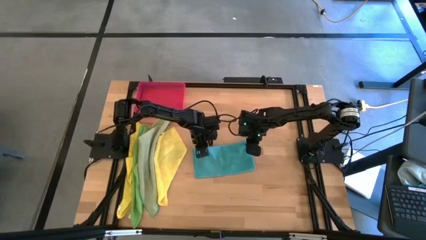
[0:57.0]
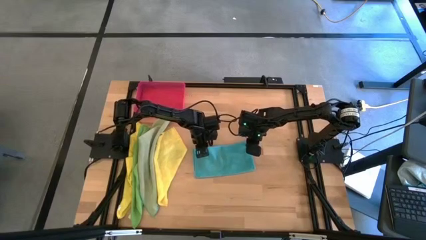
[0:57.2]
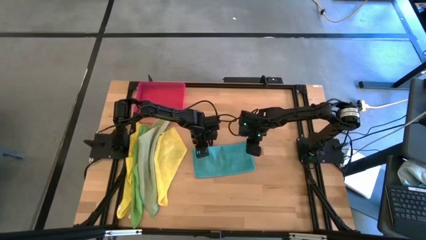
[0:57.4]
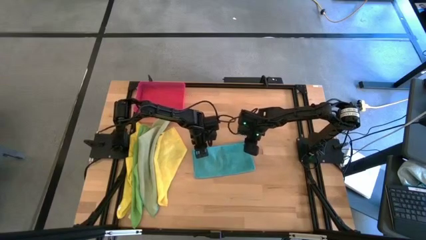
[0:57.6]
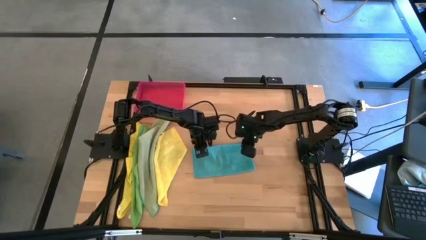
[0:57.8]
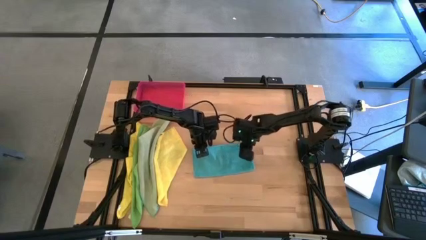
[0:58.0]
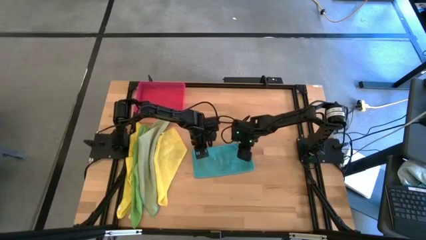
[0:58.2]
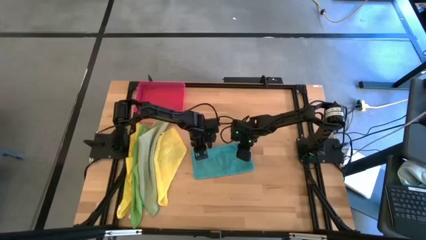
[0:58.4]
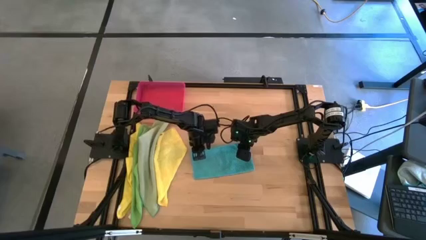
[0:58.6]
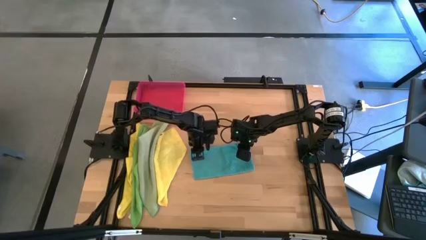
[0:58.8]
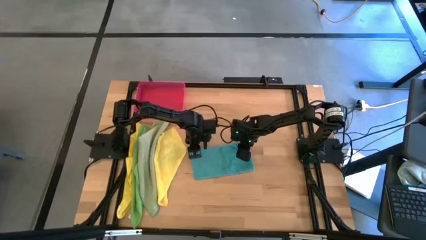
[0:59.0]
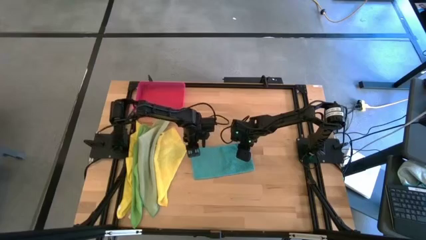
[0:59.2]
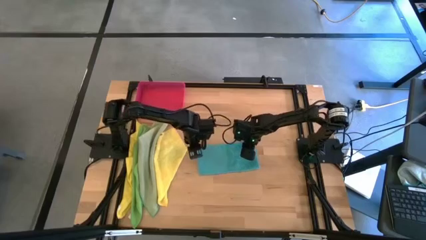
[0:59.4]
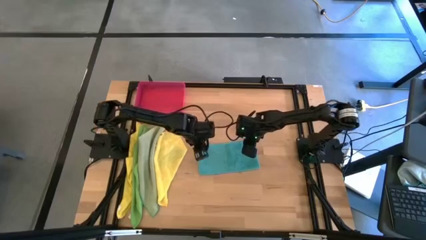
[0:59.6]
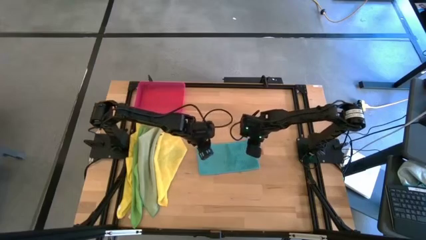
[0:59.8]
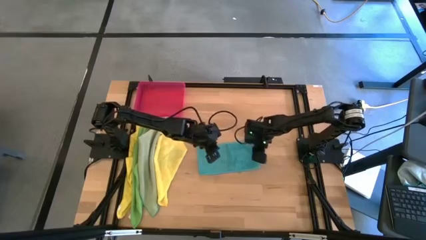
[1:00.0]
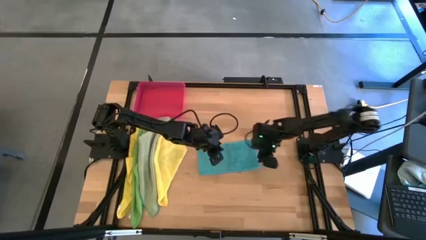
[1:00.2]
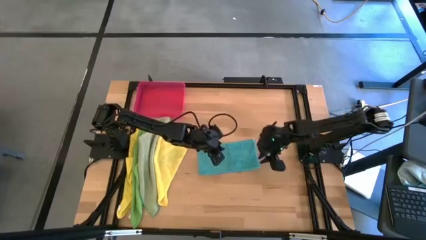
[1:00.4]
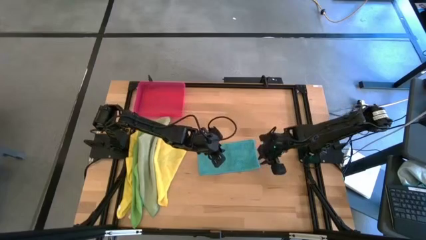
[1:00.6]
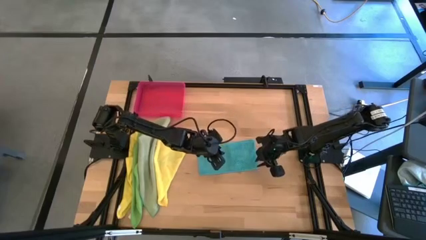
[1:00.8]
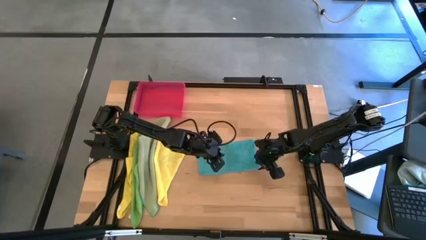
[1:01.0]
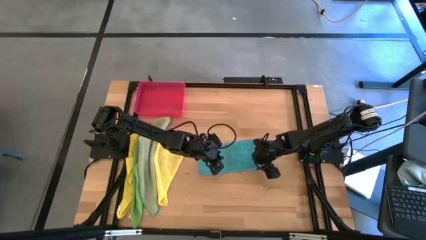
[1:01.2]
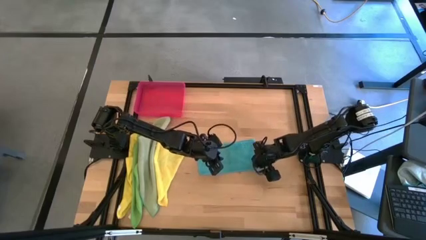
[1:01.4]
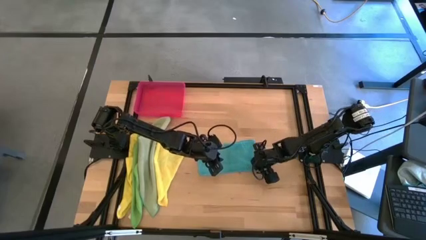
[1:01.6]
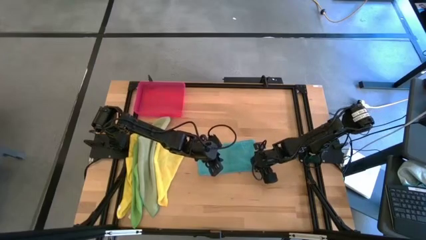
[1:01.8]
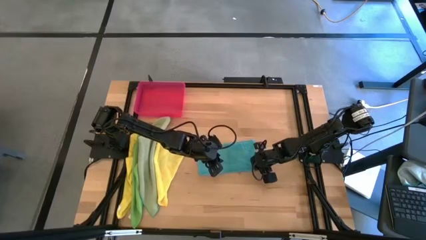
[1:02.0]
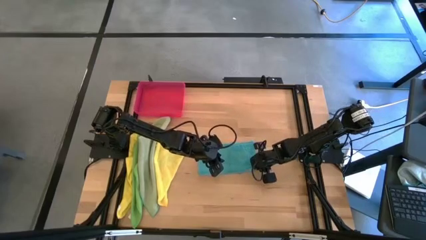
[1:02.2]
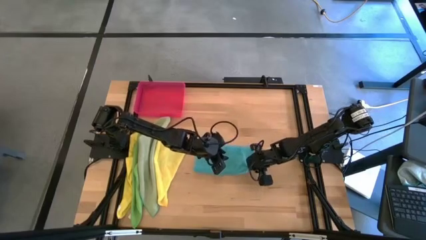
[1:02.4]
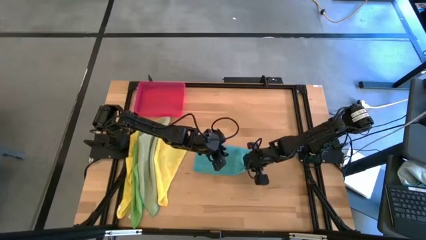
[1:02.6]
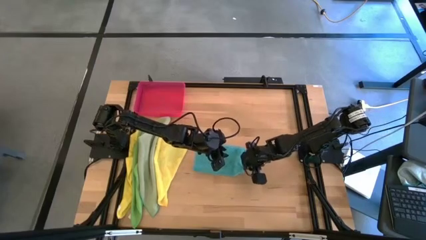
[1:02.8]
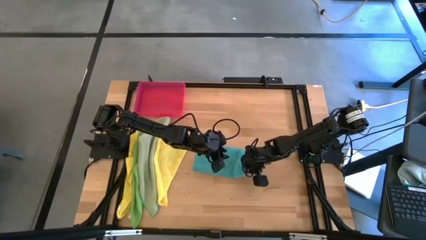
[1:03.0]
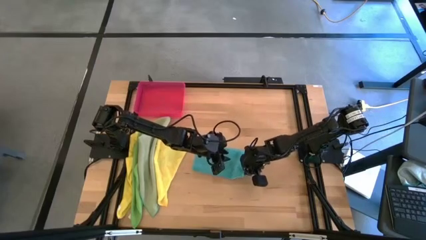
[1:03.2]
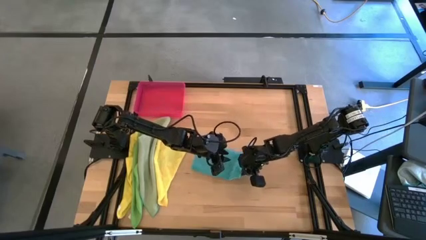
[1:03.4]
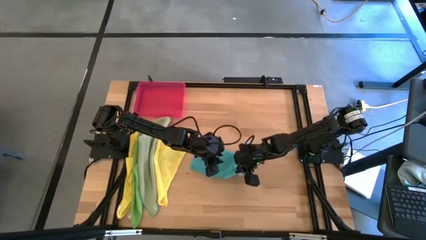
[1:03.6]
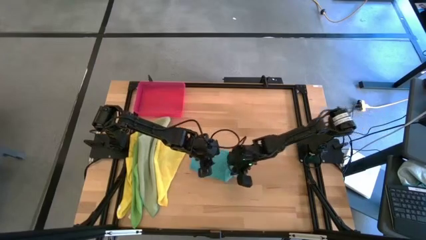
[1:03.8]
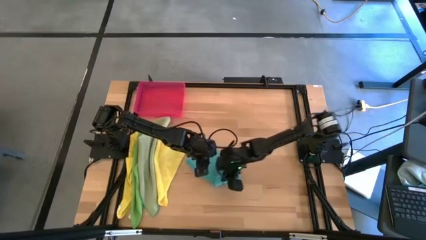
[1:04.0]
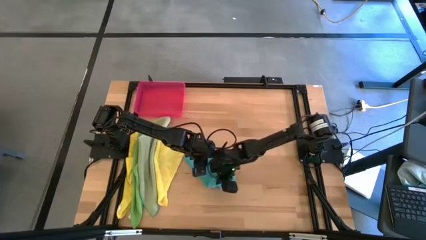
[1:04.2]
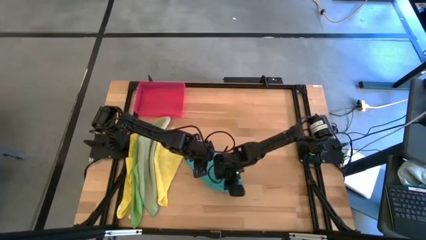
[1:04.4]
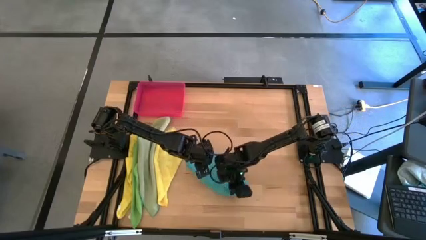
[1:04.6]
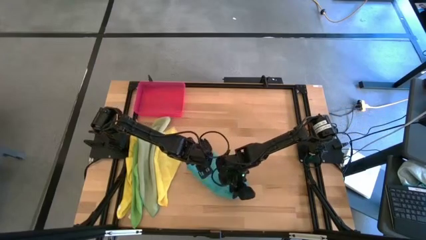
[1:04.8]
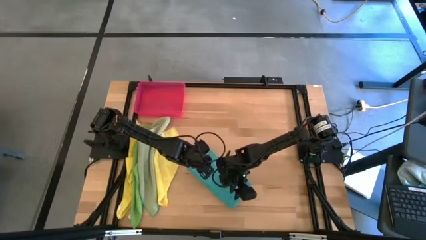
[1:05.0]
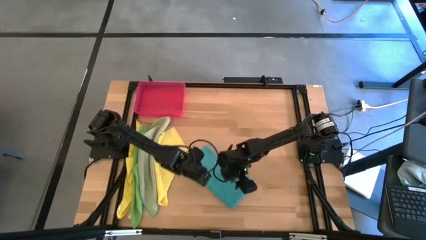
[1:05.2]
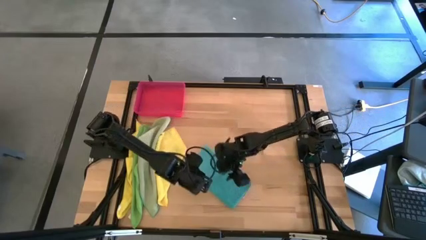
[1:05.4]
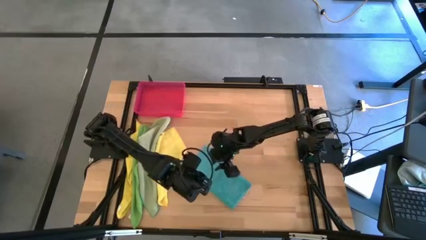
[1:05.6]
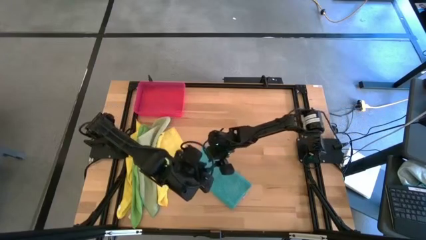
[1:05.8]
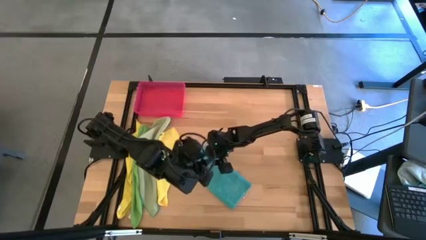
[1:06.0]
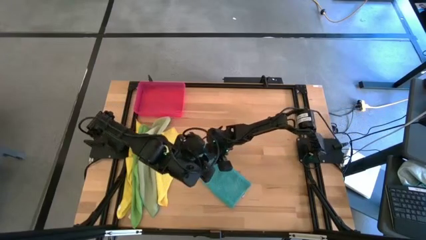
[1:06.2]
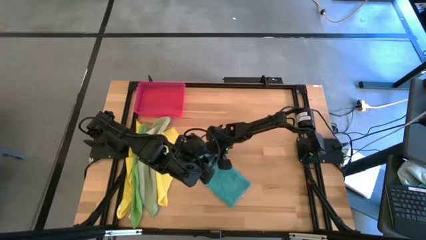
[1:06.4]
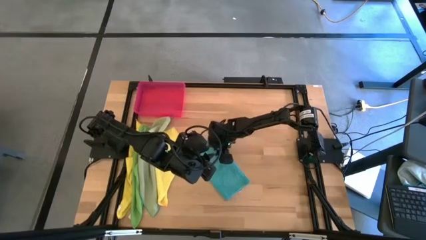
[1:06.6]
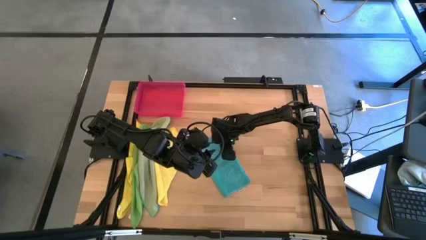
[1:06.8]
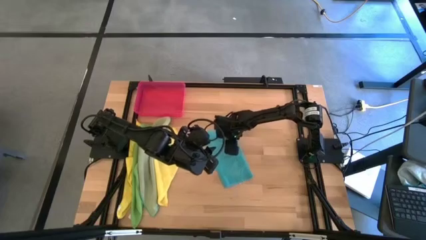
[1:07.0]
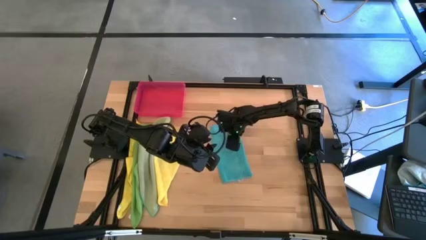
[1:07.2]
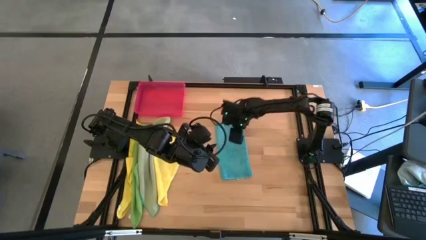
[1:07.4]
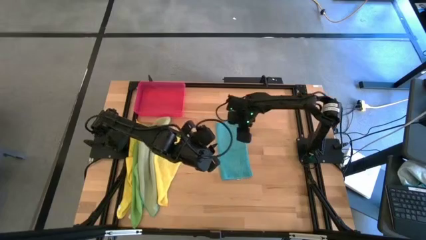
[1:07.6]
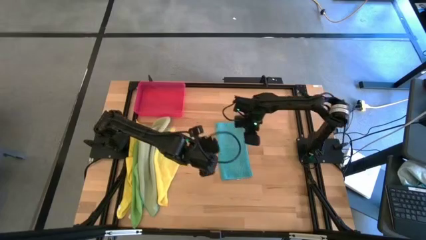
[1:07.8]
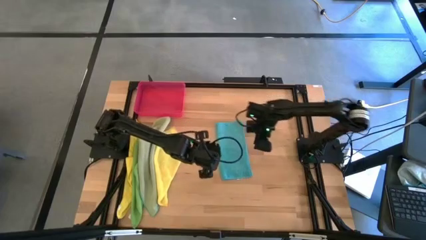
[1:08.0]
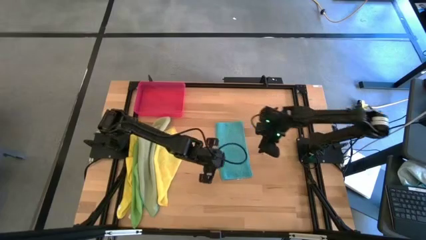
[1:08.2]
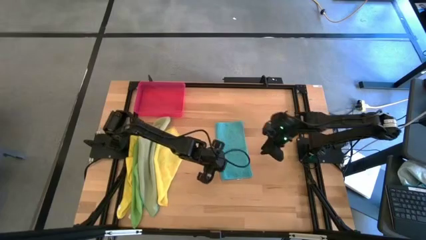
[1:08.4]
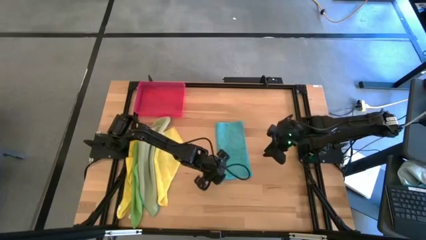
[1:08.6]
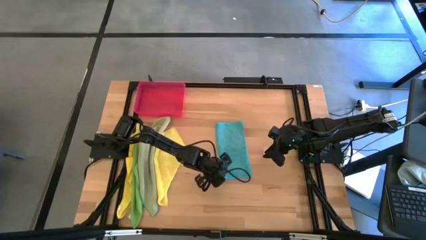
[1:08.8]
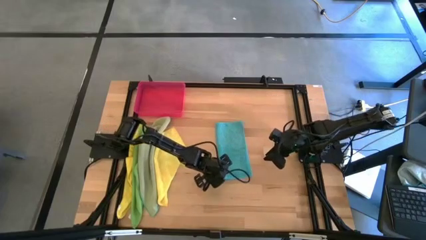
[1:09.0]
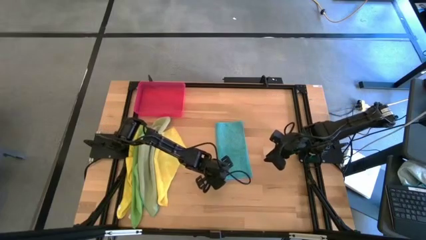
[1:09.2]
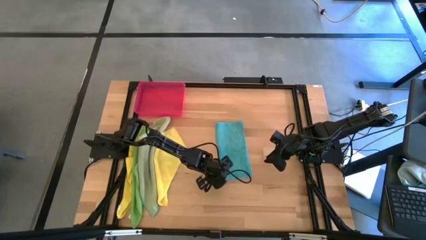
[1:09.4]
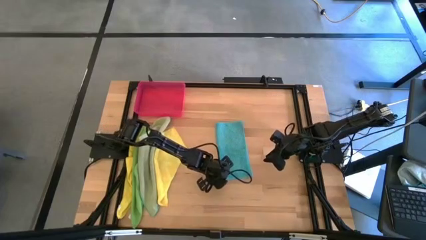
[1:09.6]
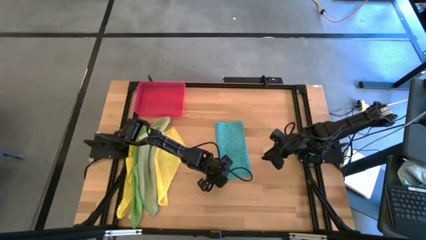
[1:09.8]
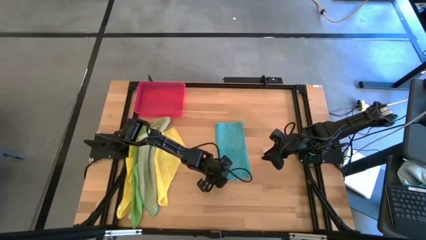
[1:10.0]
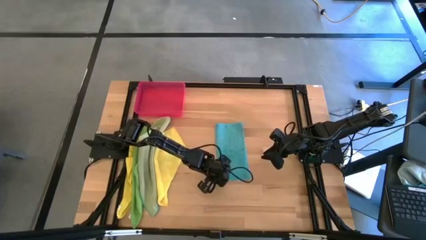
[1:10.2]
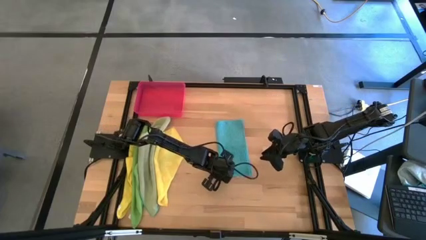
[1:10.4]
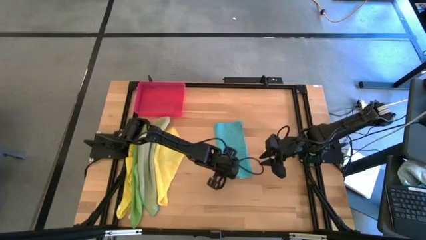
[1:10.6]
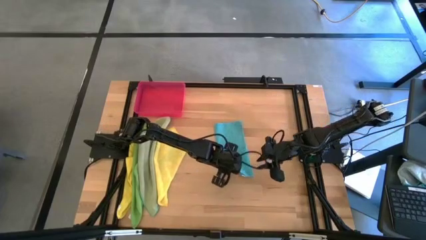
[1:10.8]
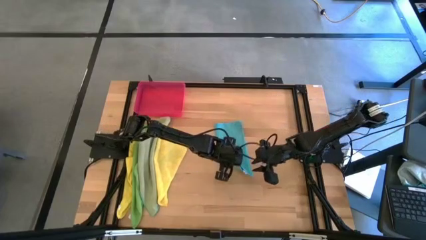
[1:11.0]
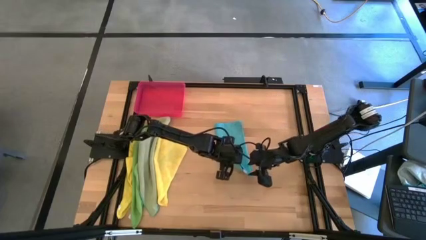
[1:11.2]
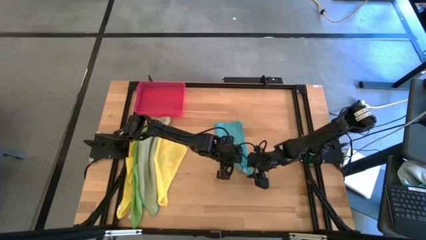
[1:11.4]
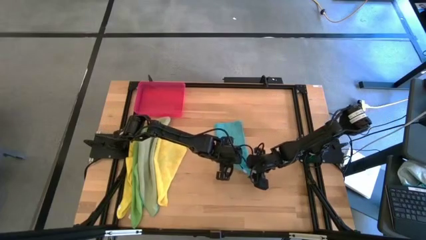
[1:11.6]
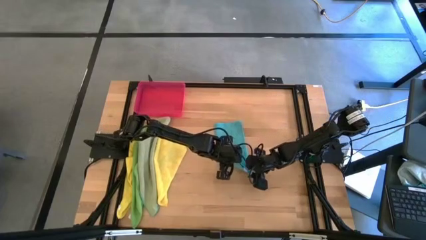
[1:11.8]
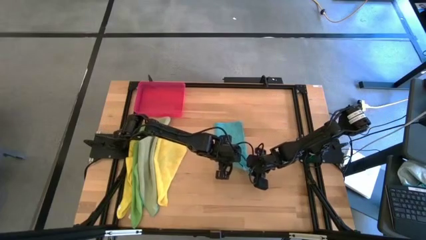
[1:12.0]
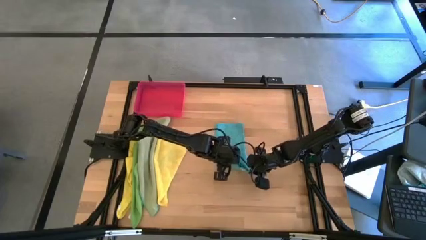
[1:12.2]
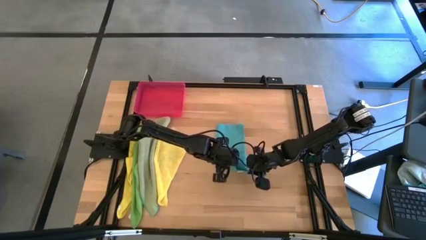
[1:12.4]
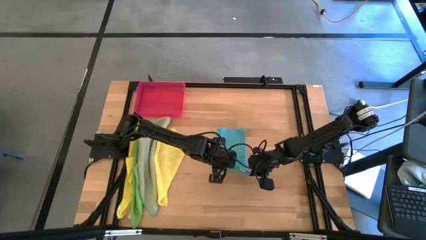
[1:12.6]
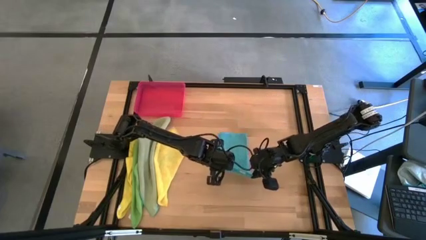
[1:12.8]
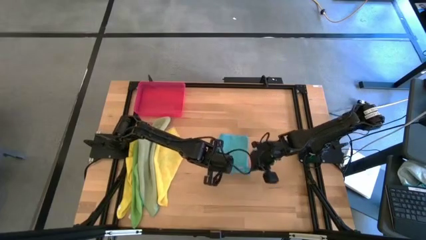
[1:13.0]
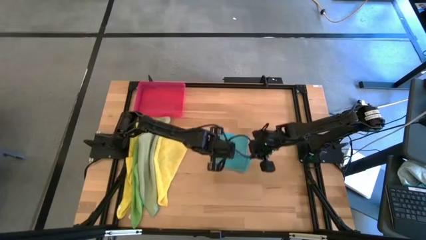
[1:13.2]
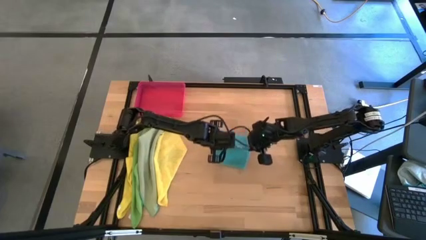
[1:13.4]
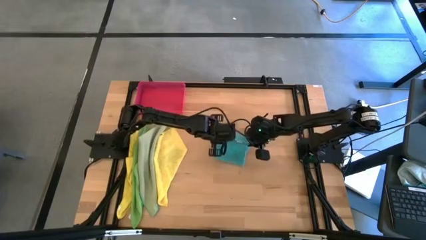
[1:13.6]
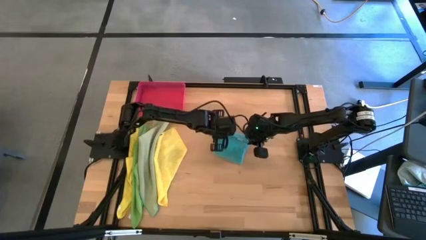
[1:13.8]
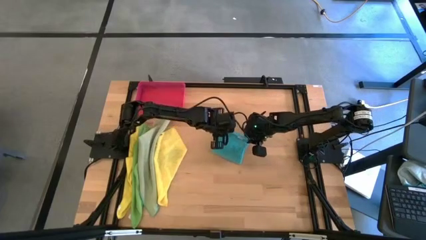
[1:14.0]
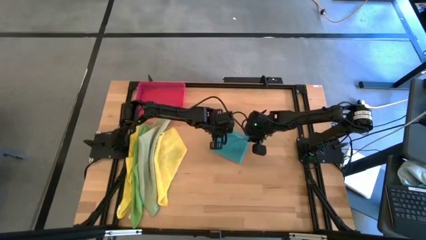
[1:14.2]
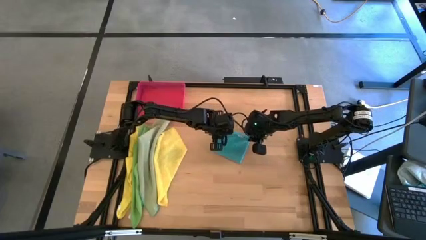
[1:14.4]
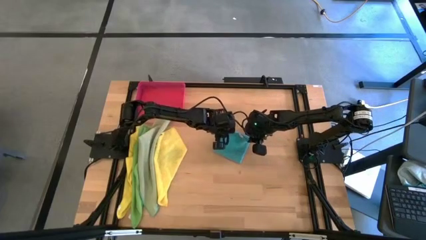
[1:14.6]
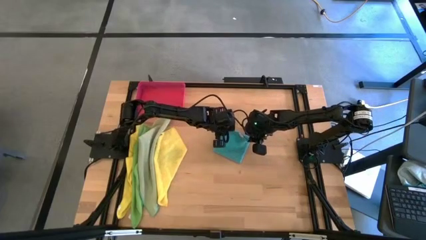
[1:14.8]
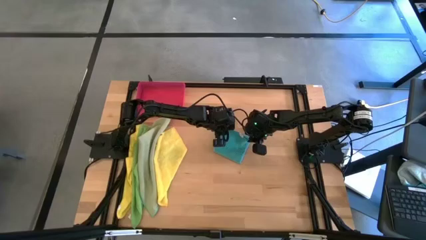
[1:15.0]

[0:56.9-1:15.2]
Task: Fold microfiber towels
Fold the blue microfiber towel
